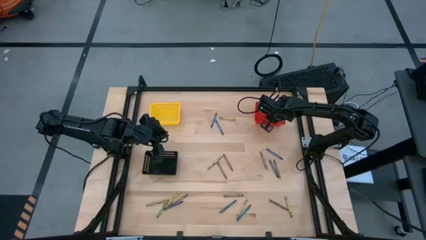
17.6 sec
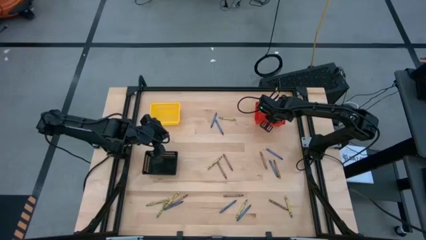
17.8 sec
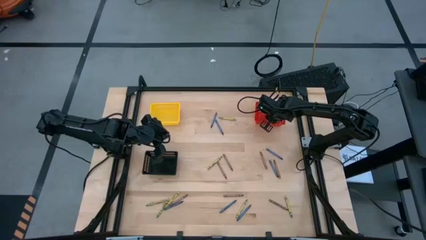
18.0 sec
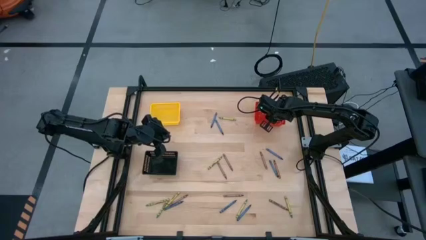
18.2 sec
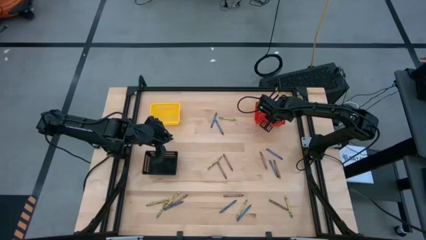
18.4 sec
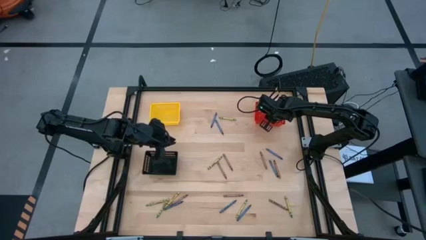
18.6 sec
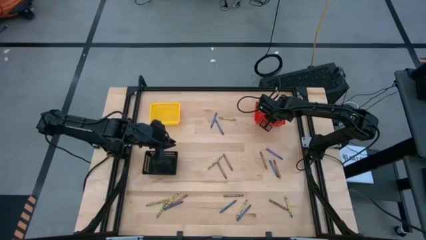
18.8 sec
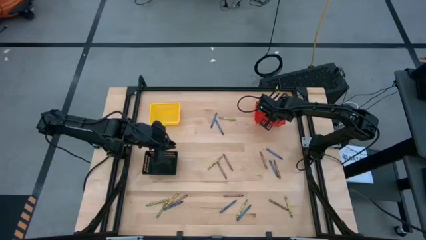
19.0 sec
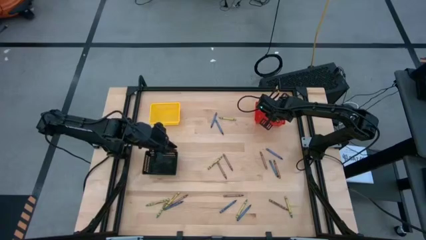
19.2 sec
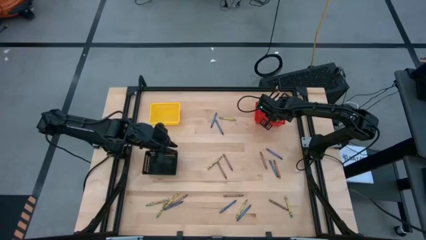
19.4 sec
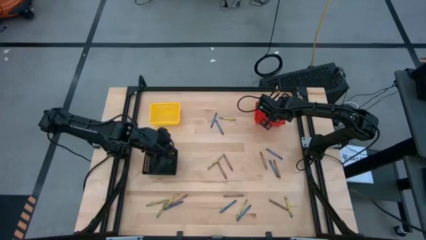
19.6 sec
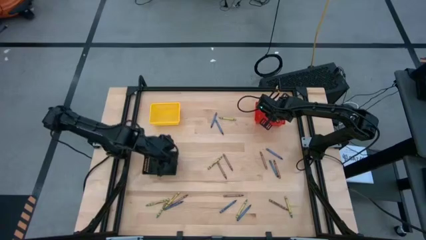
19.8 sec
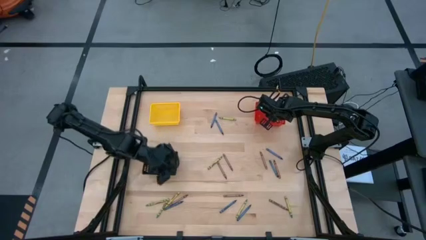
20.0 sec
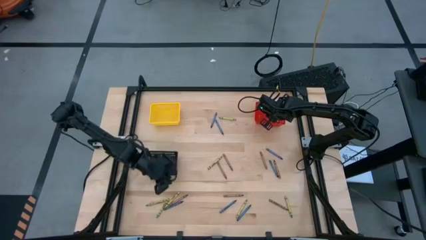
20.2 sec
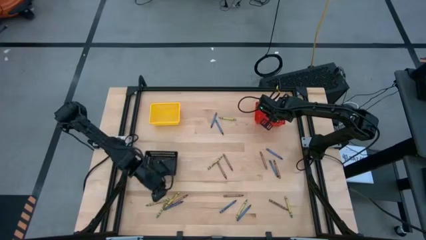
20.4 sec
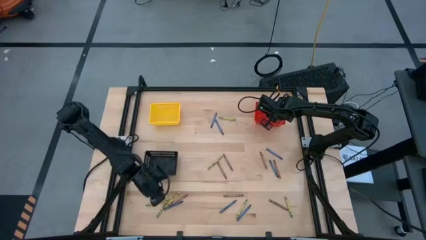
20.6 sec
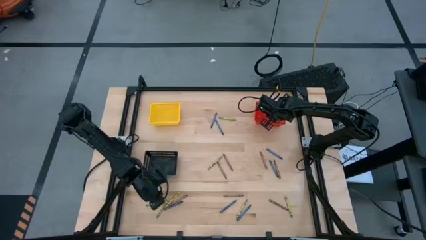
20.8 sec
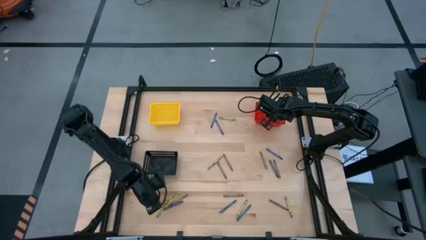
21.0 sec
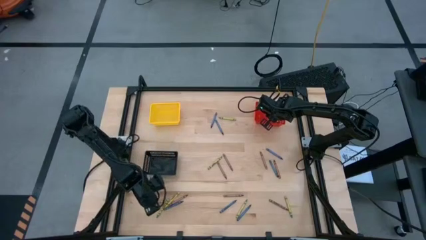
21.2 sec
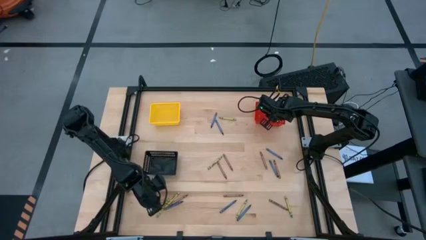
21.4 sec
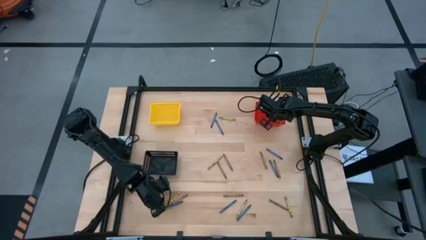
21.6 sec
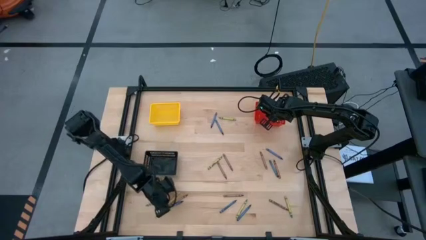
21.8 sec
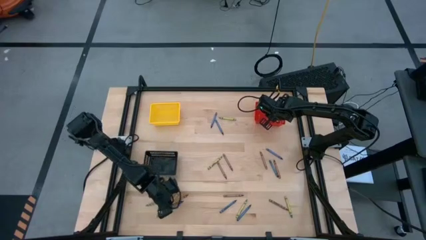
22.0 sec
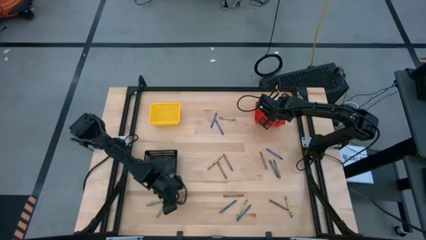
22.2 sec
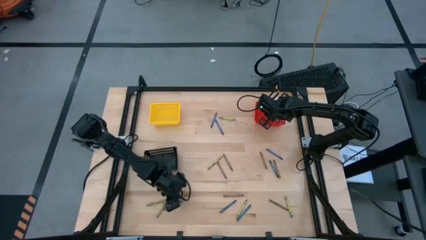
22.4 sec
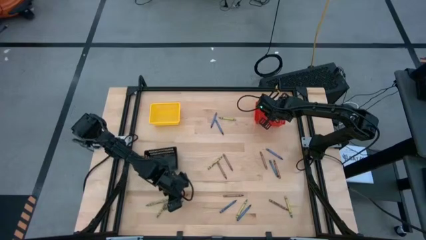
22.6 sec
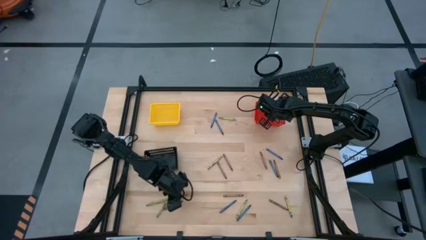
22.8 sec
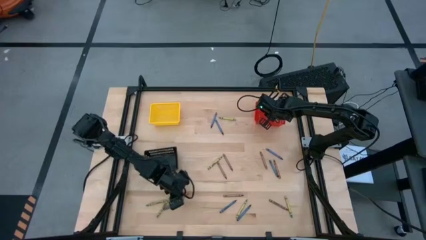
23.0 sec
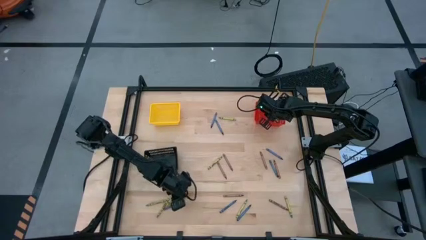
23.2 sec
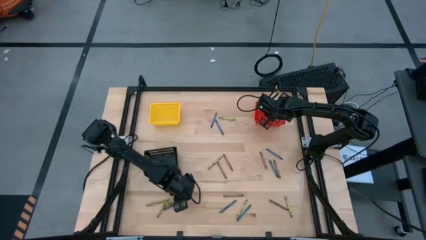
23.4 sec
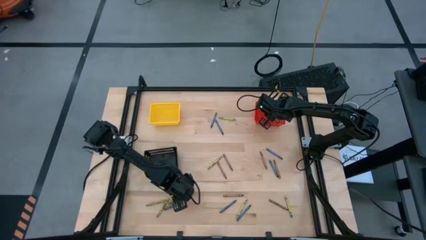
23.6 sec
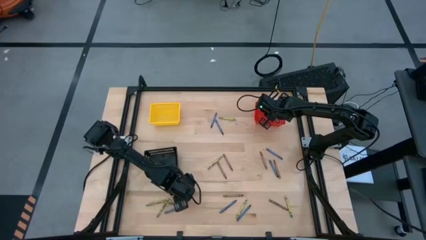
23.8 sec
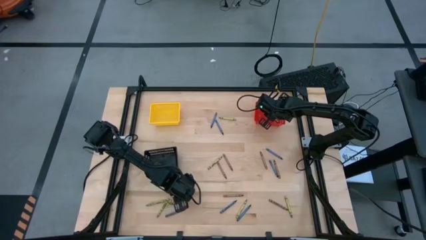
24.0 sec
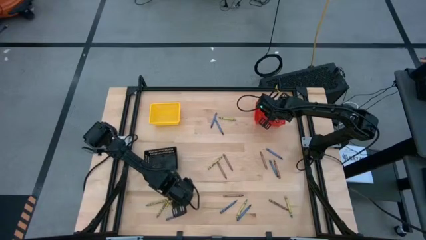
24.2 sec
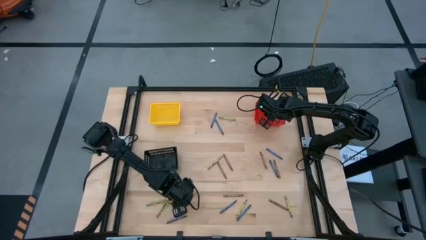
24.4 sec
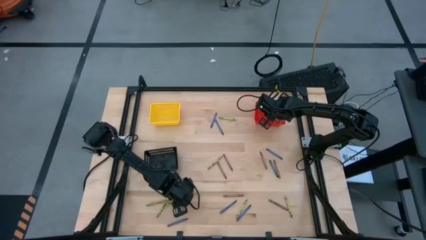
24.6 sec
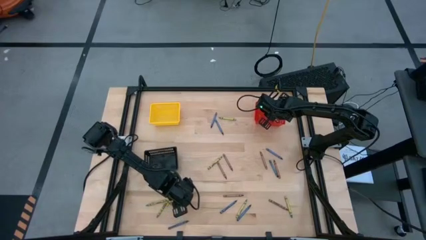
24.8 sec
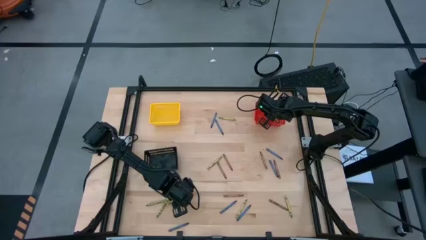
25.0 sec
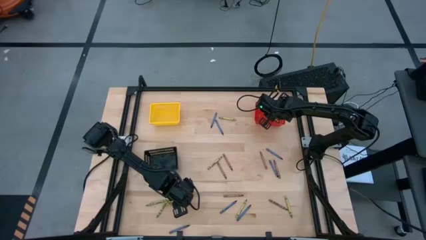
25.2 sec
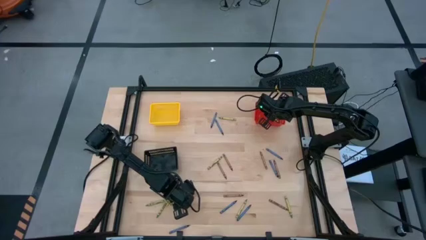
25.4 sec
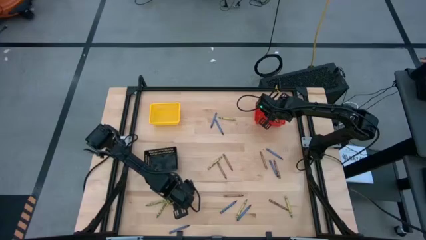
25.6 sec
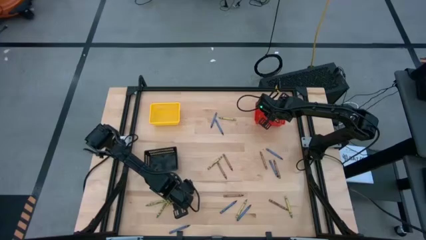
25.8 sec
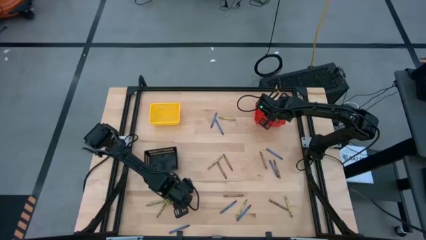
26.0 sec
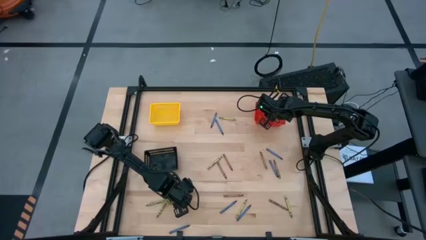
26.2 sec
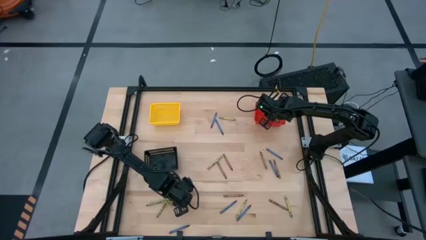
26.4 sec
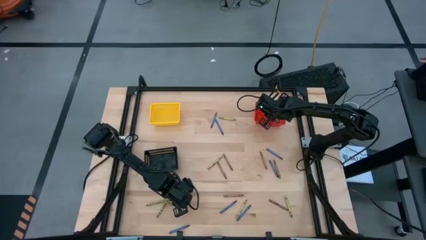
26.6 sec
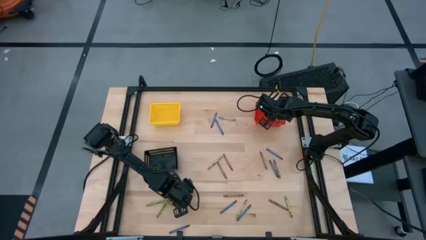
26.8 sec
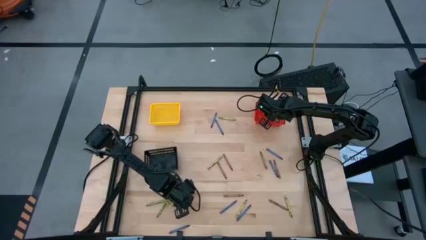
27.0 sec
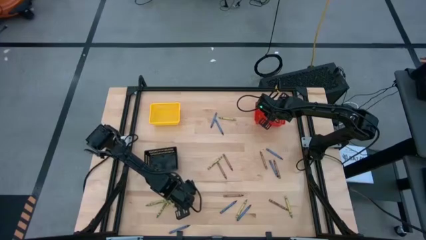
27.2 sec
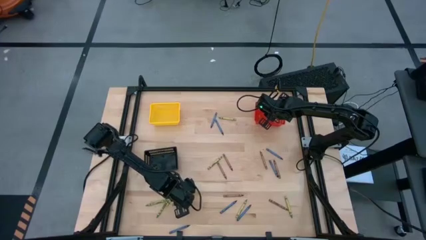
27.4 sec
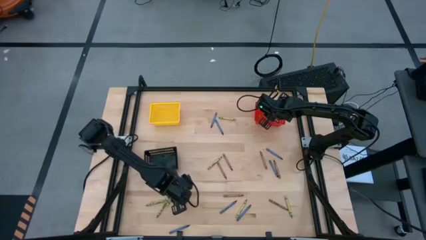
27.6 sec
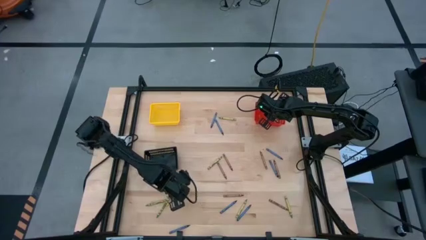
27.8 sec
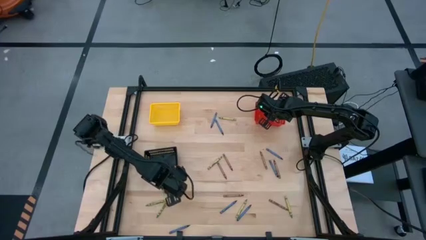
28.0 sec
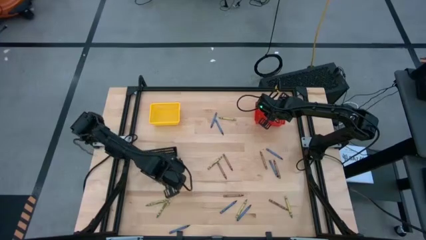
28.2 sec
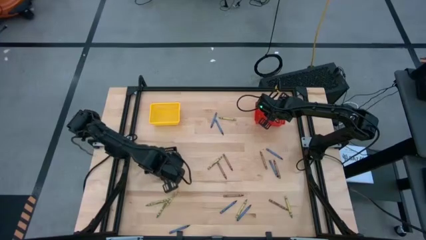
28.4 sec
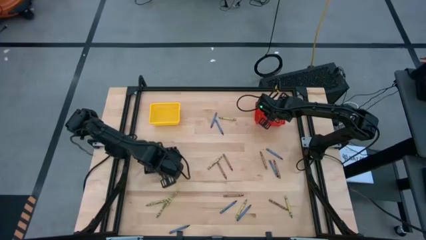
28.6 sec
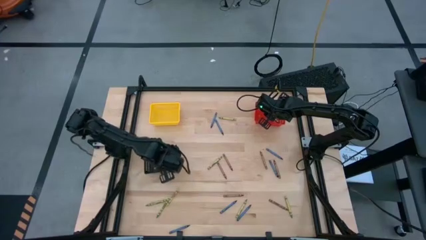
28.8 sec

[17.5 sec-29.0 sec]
Task: Sort crayons
Put the brown crayon into the black bin
